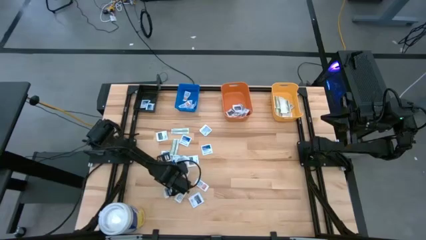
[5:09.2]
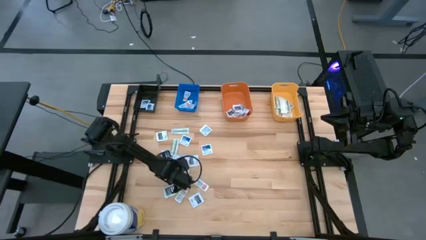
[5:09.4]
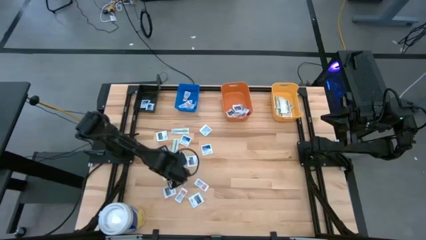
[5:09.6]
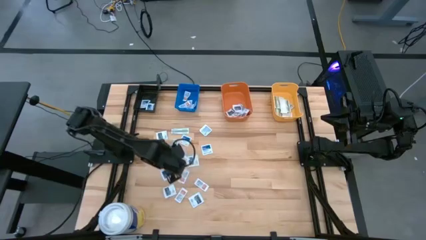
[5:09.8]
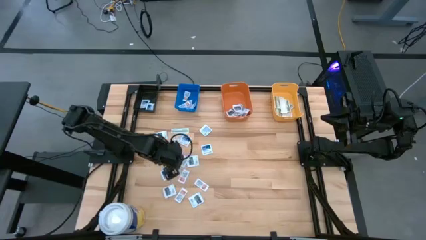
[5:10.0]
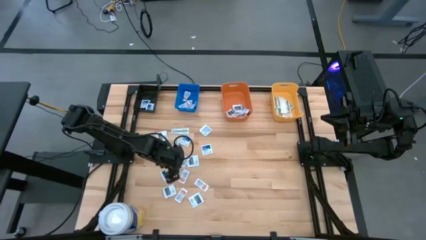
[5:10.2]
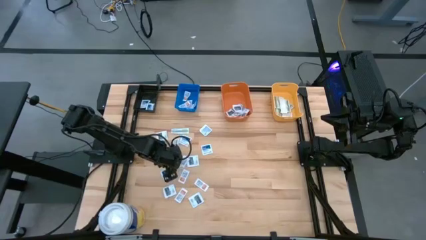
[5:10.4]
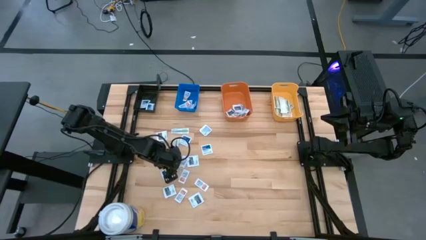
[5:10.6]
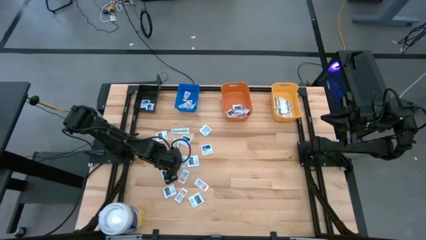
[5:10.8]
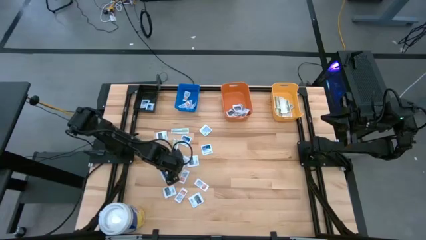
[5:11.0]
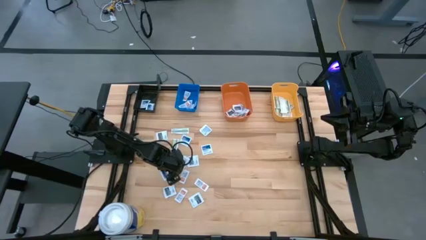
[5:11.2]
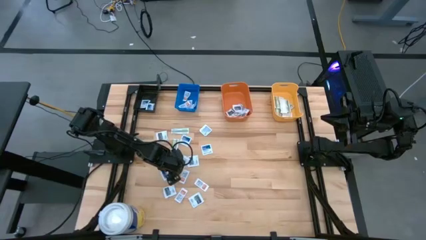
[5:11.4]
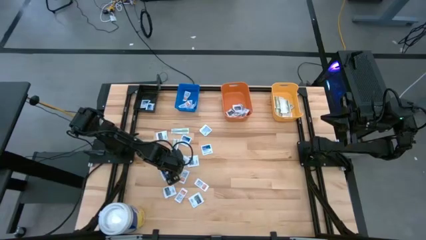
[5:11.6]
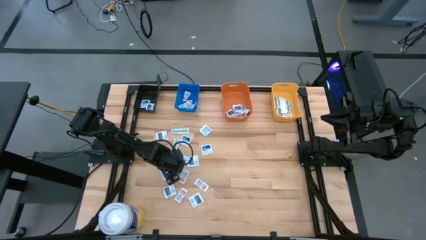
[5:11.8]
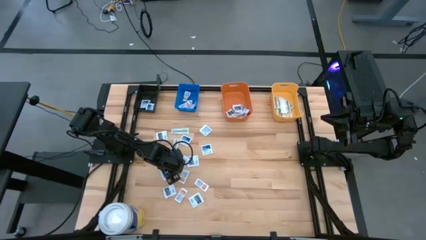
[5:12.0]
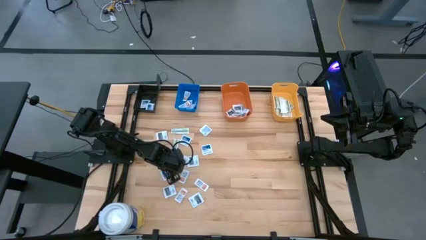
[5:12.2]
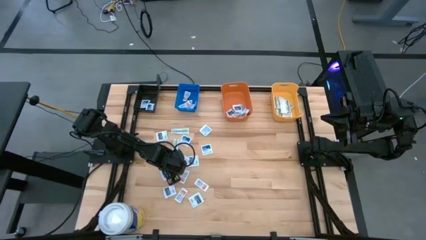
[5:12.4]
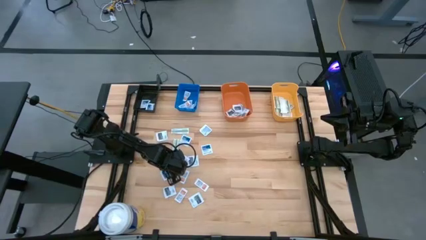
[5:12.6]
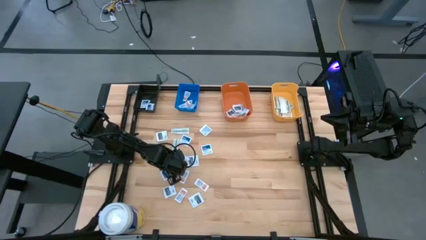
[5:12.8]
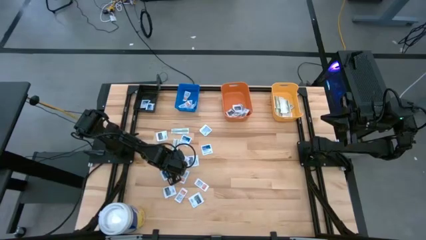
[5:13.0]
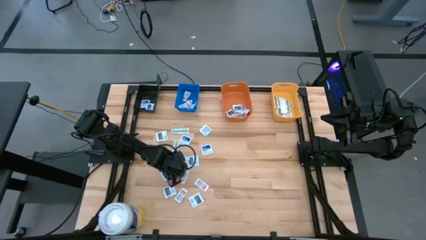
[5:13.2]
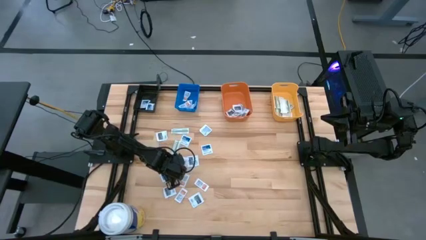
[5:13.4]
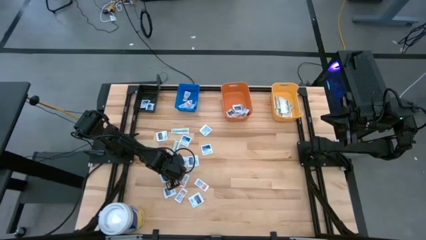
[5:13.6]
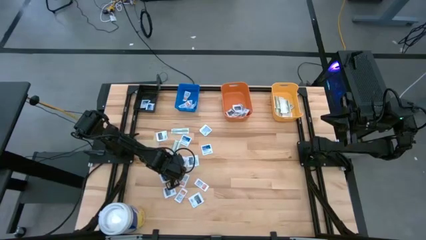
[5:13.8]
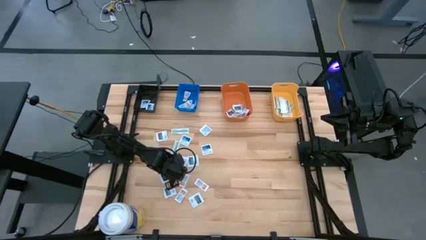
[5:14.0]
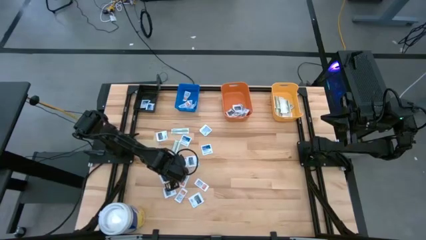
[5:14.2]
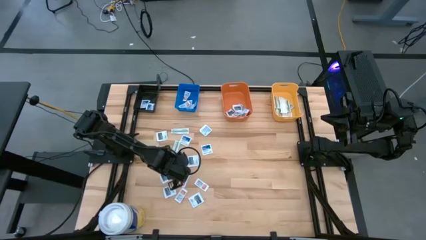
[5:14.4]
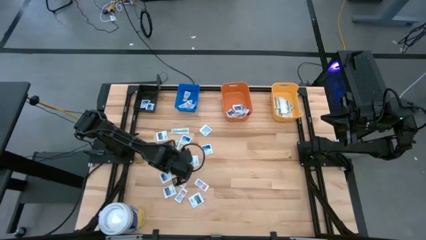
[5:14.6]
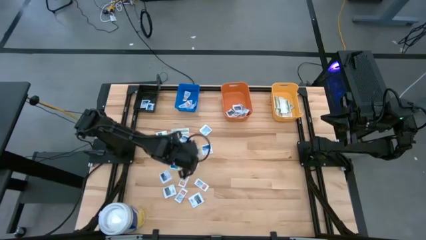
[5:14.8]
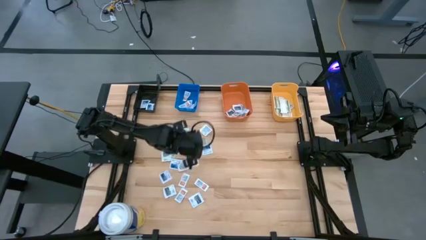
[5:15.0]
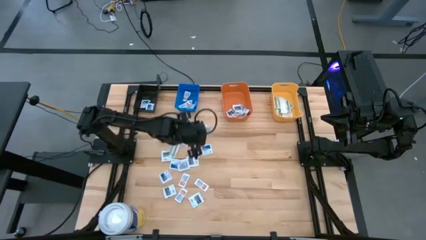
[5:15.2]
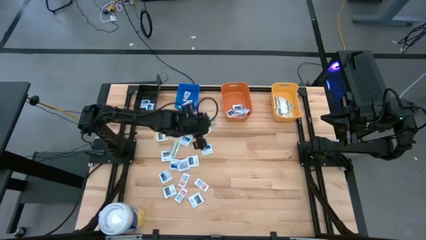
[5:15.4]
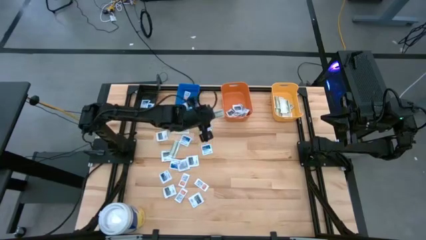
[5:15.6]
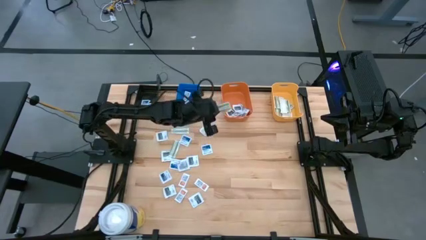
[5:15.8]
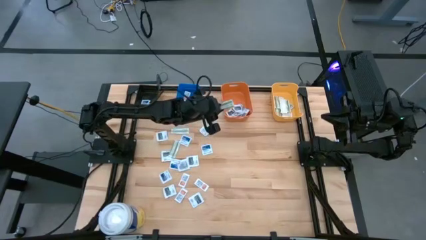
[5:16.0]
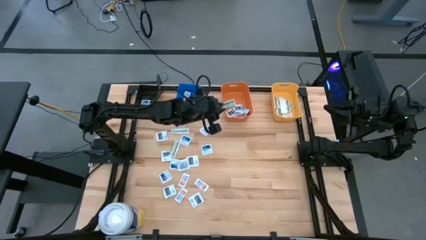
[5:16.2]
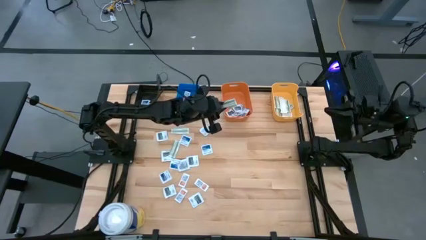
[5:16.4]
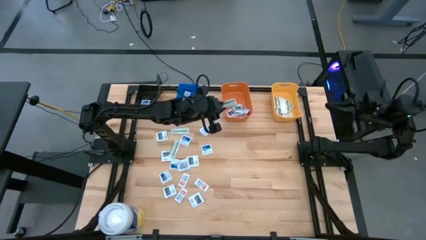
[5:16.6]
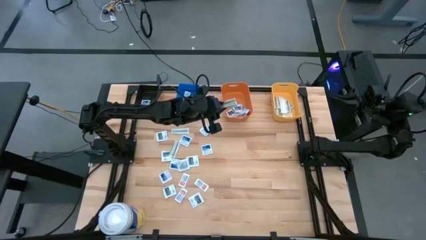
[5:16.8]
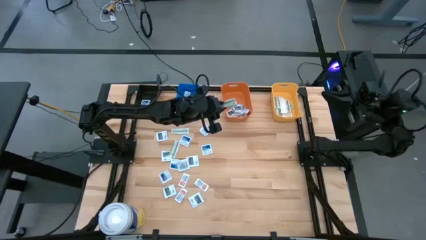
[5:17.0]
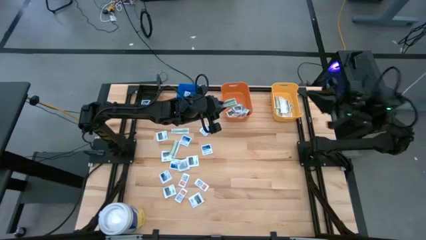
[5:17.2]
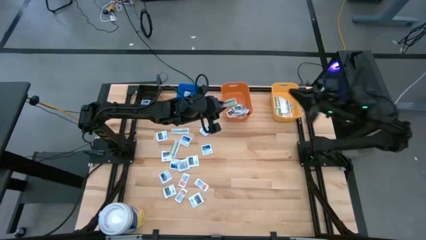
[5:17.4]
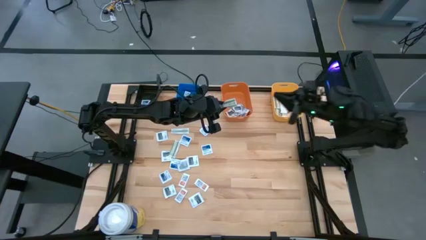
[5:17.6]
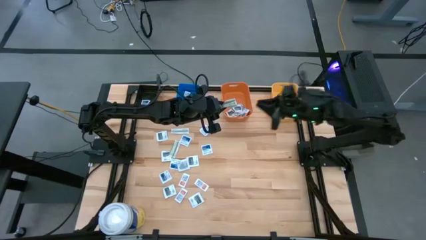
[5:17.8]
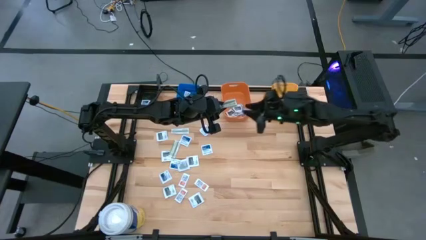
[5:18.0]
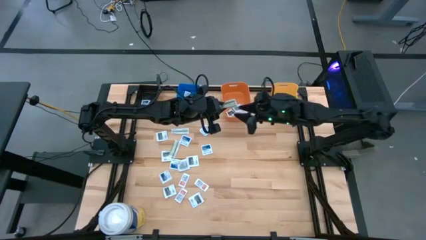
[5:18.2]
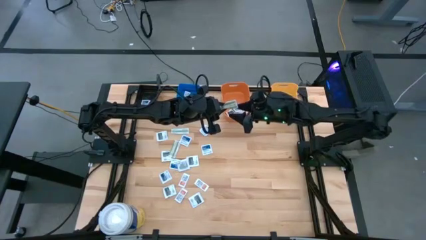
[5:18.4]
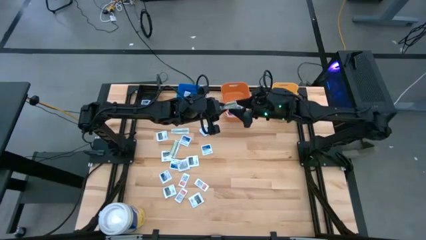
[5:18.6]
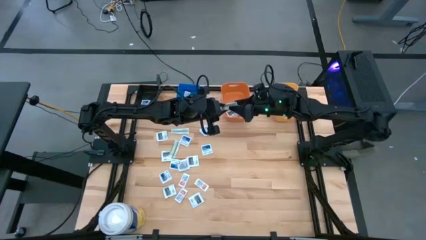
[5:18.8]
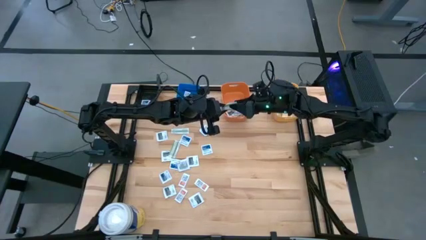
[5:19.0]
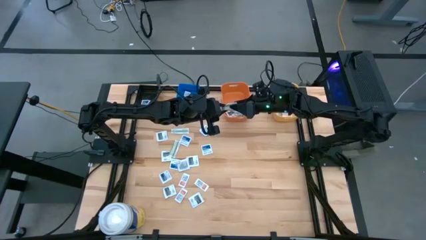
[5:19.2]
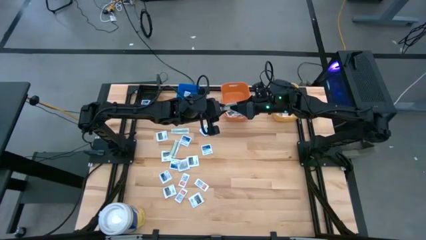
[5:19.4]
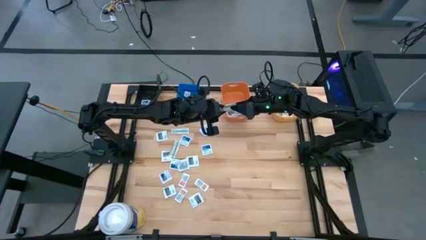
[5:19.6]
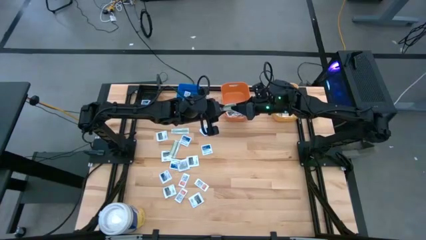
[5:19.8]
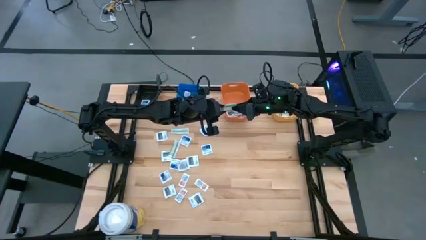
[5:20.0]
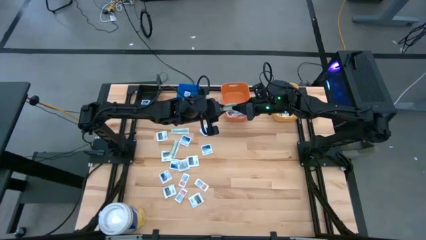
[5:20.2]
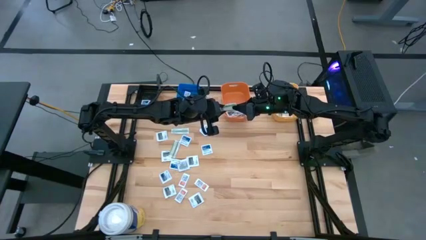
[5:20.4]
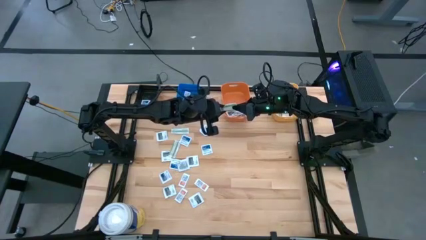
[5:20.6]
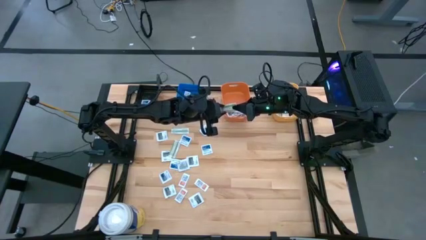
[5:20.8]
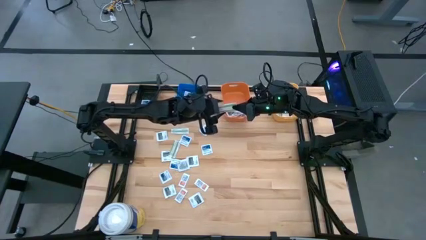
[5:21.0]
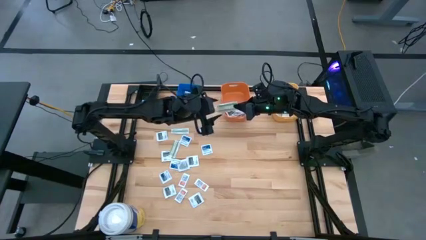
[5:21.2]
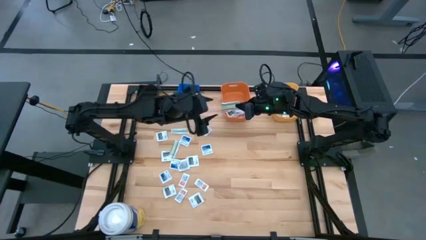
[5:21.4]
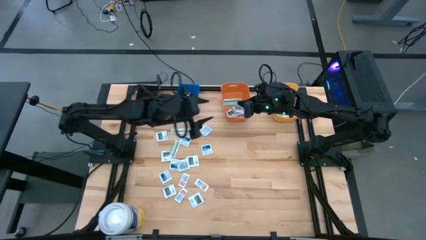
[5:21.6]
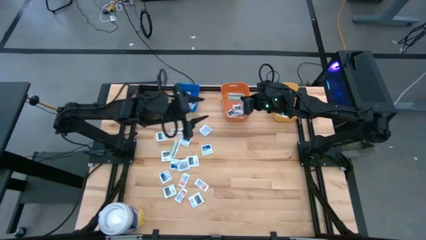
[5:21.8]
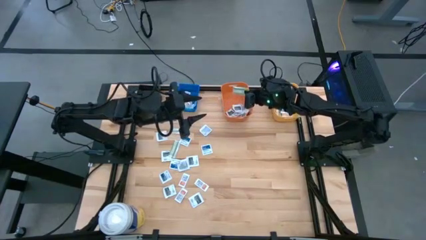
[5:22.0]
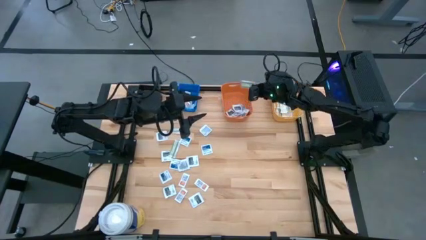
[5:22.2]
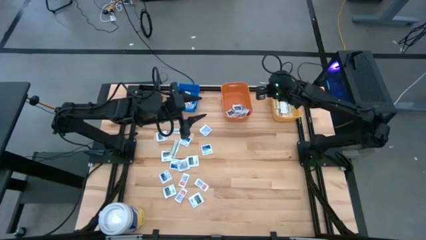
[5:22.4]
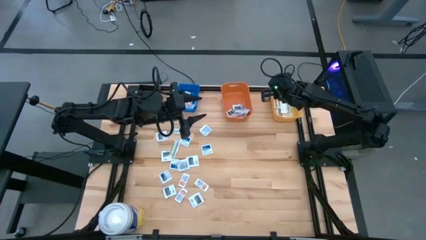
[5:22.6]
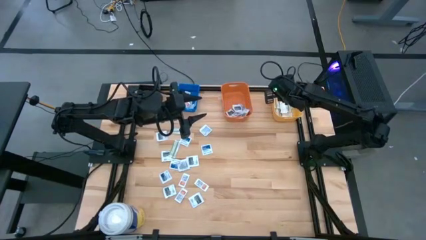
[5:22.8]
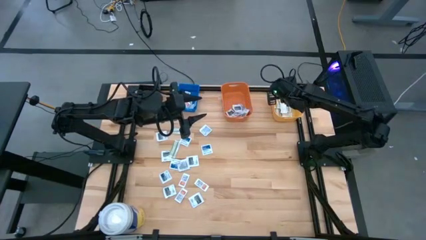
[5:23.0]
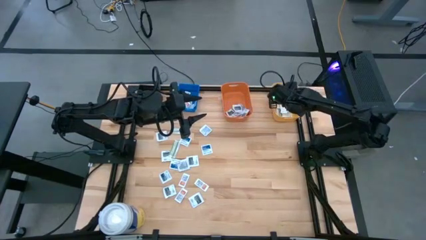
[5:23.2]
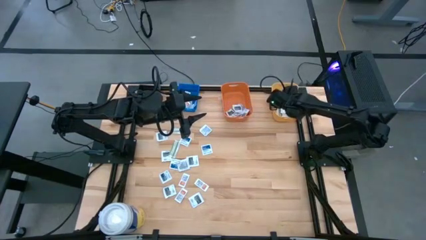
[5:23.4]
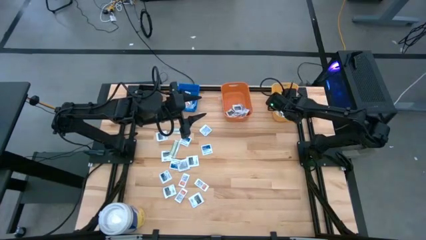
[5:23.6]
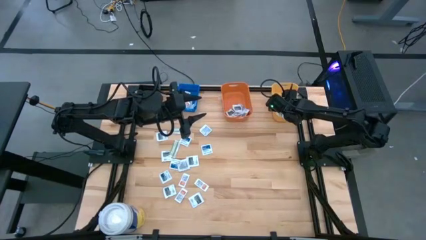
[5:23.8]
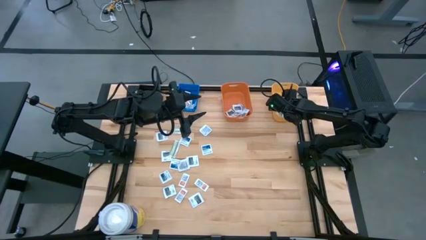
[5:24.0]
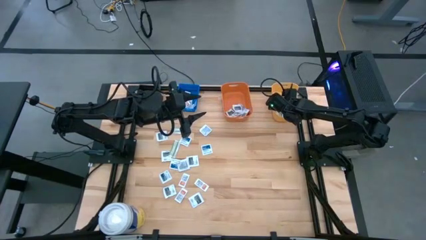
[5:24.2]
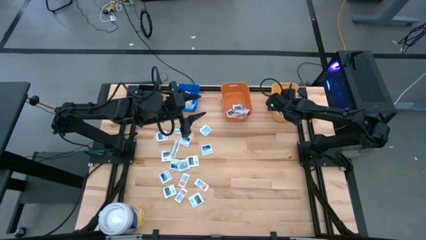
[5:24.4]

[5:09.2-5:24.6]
Task: Pick & Place First Aid Supplies
Put the bandage into the yellow bin
